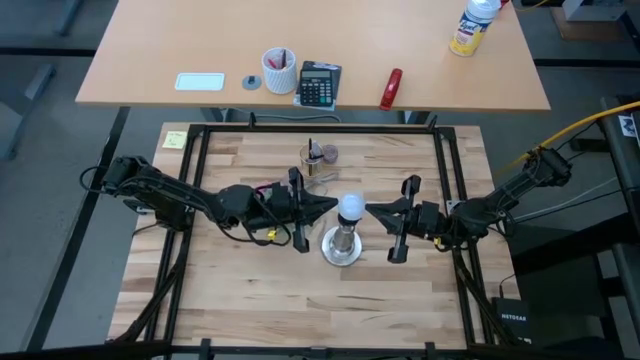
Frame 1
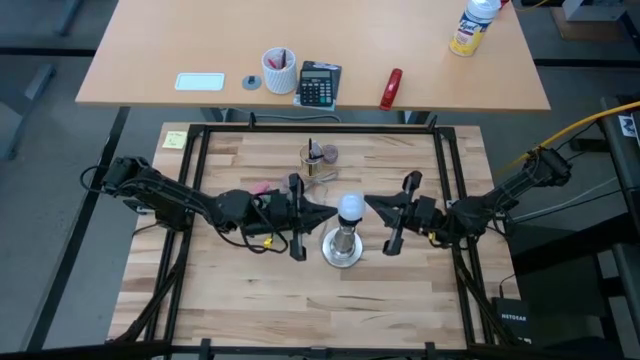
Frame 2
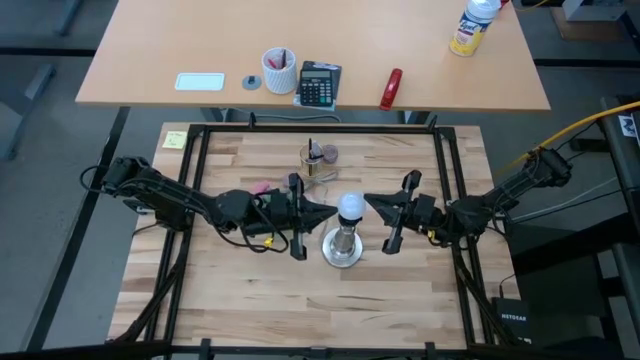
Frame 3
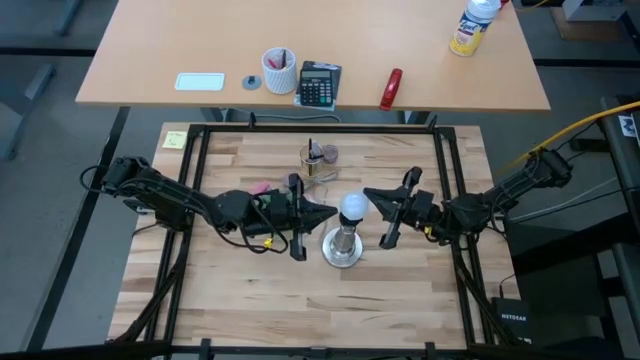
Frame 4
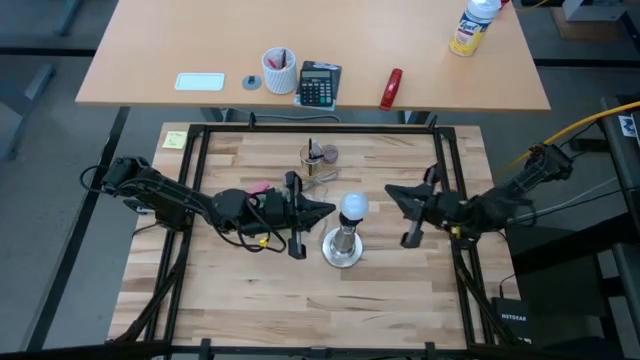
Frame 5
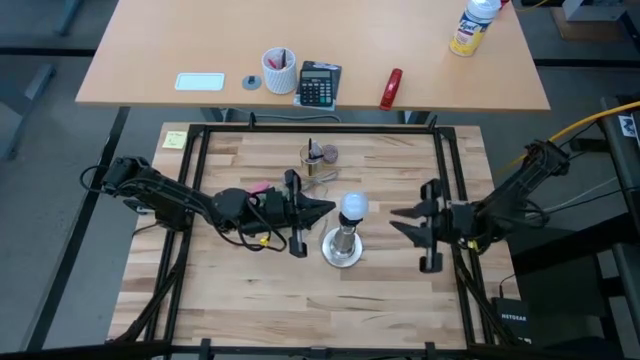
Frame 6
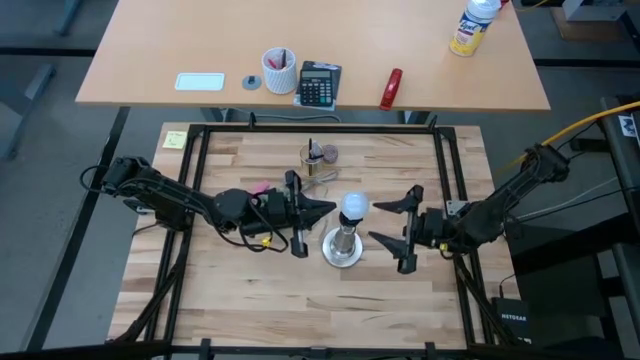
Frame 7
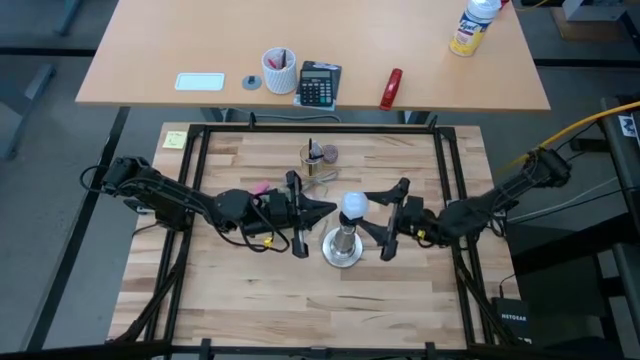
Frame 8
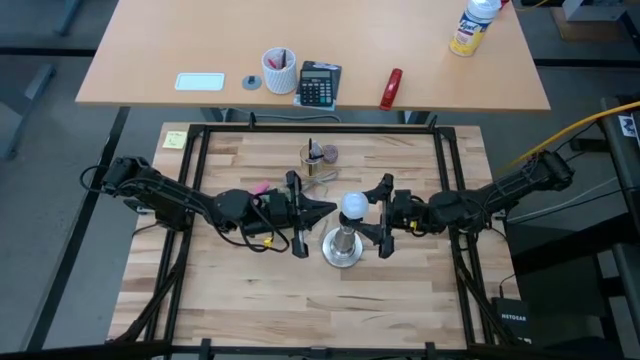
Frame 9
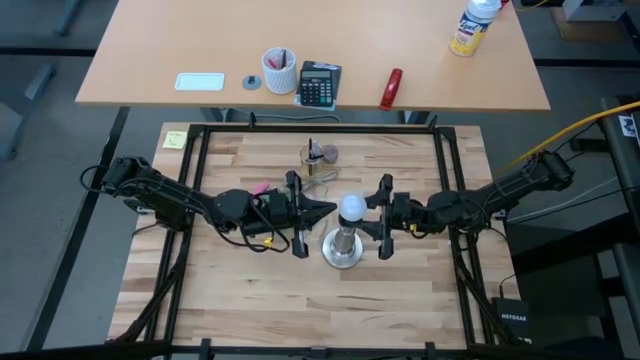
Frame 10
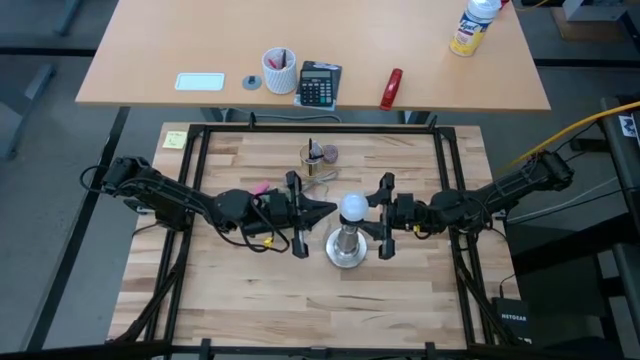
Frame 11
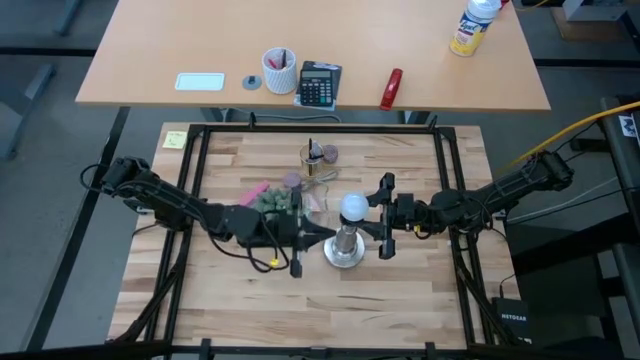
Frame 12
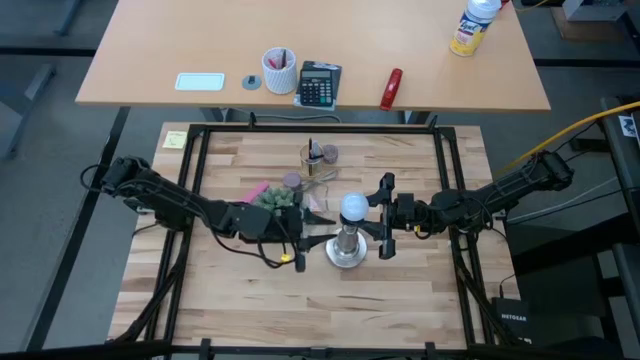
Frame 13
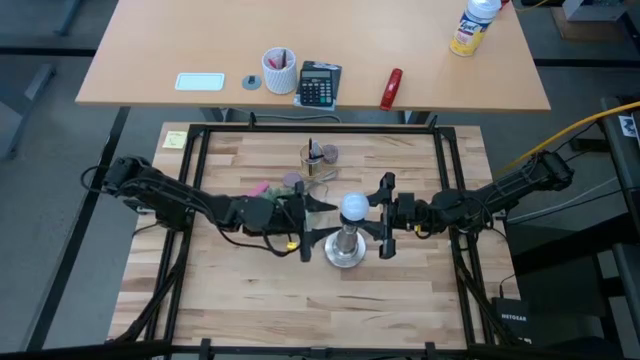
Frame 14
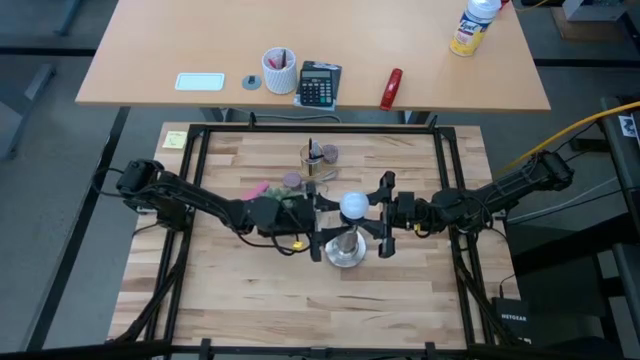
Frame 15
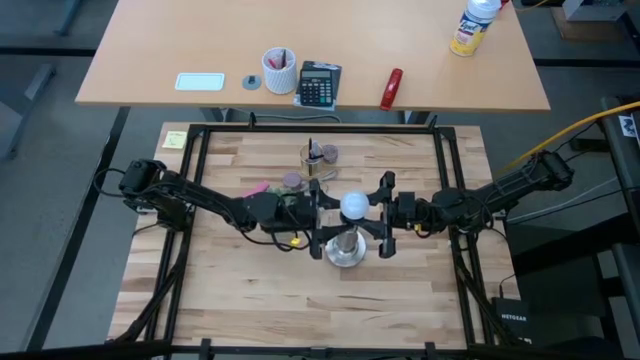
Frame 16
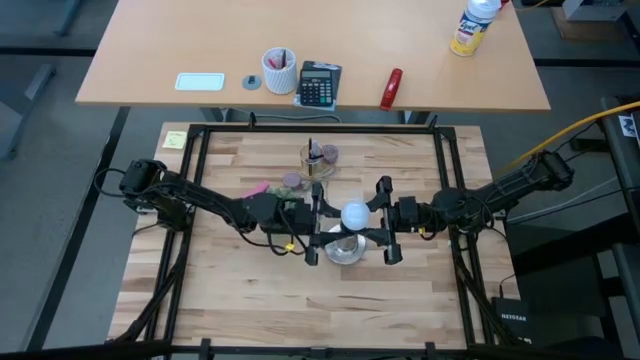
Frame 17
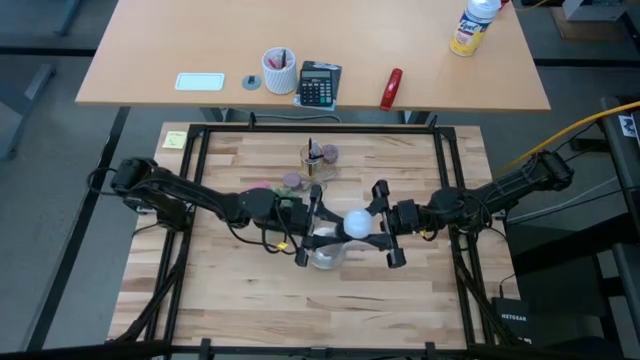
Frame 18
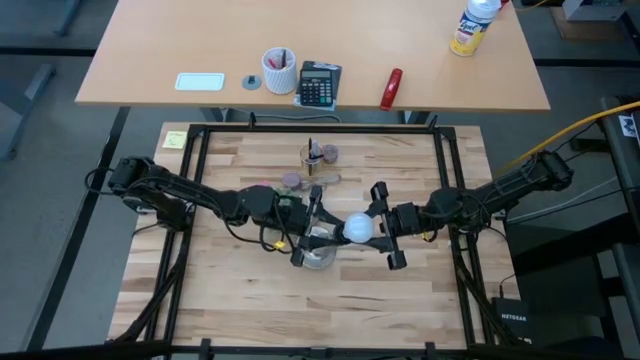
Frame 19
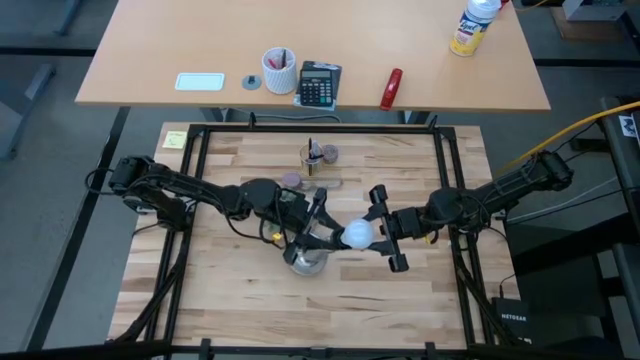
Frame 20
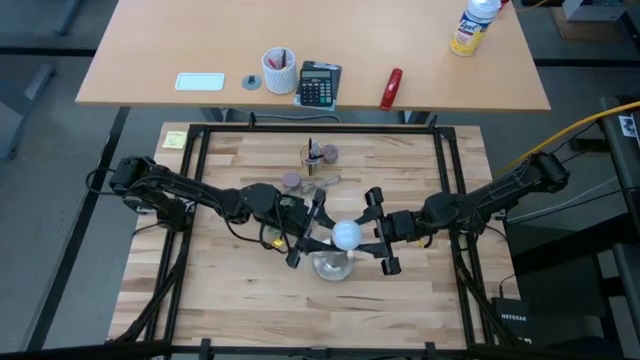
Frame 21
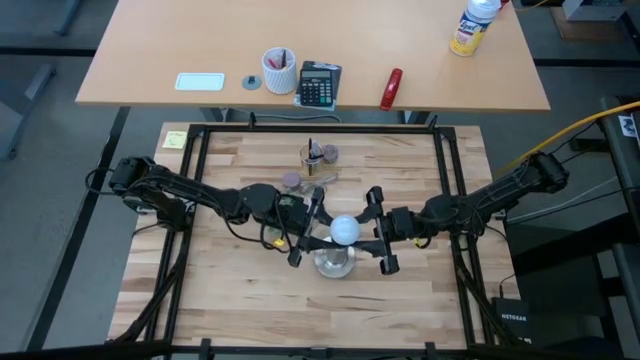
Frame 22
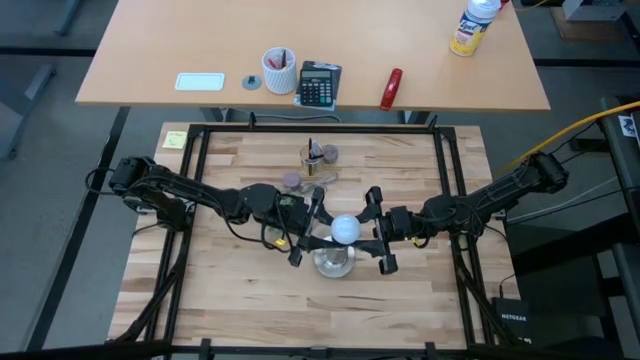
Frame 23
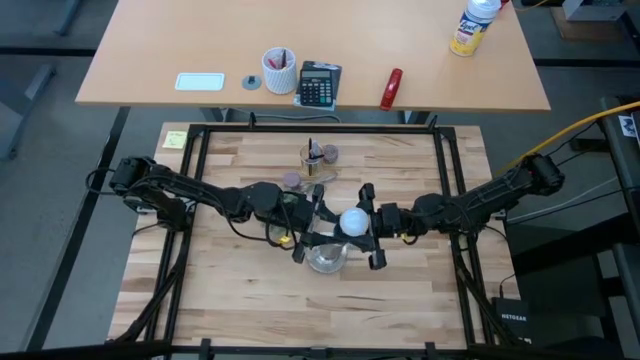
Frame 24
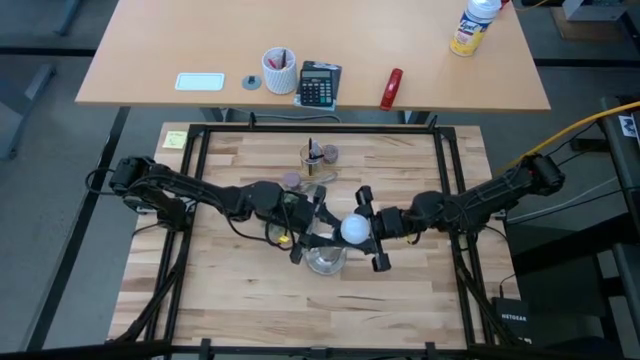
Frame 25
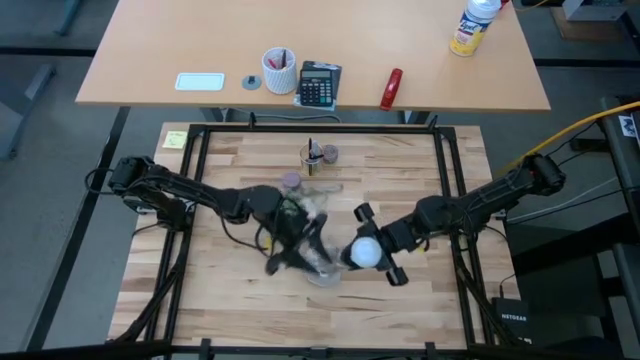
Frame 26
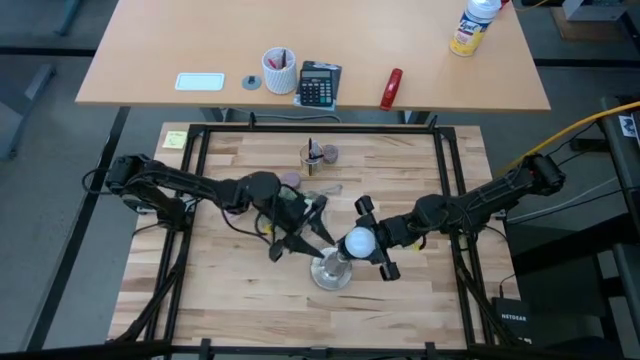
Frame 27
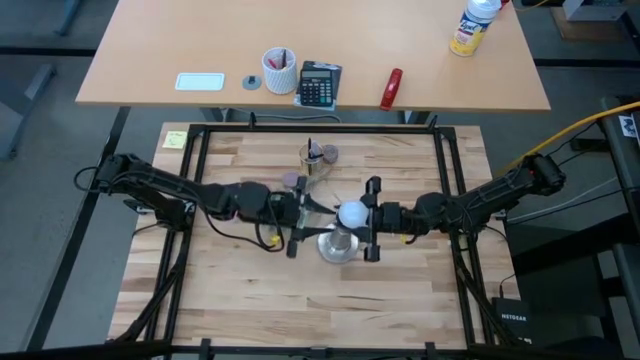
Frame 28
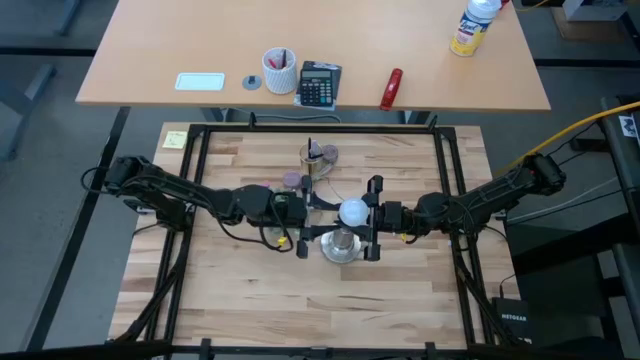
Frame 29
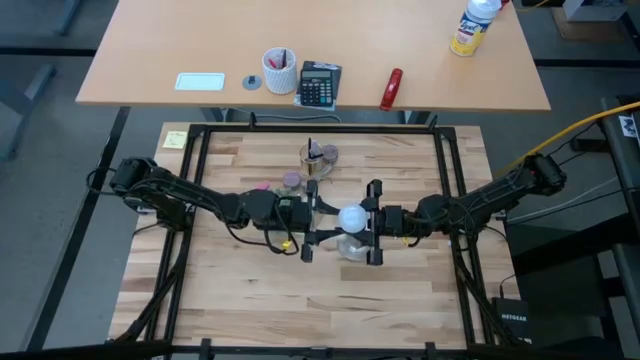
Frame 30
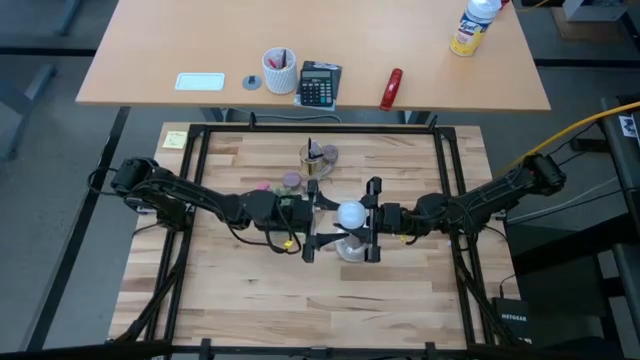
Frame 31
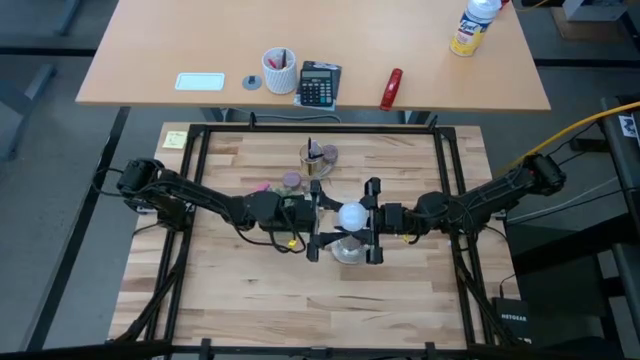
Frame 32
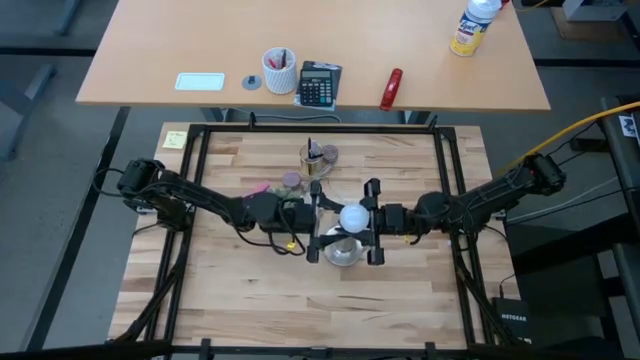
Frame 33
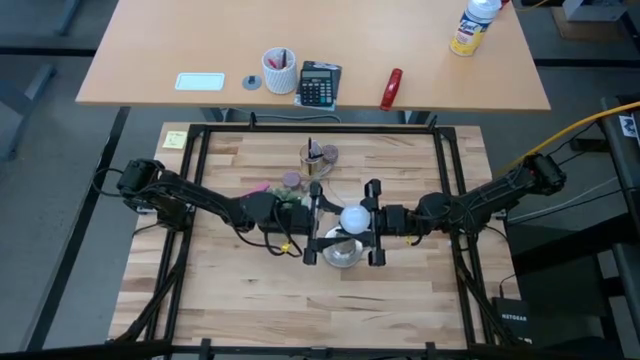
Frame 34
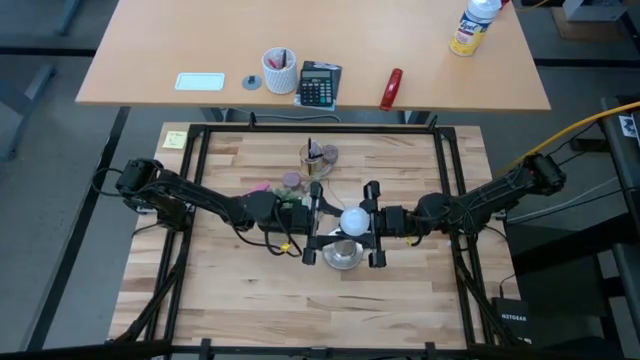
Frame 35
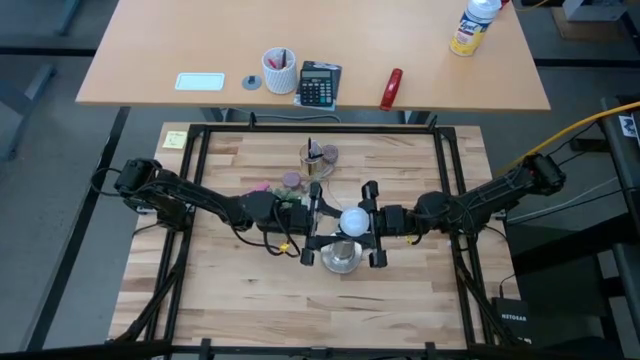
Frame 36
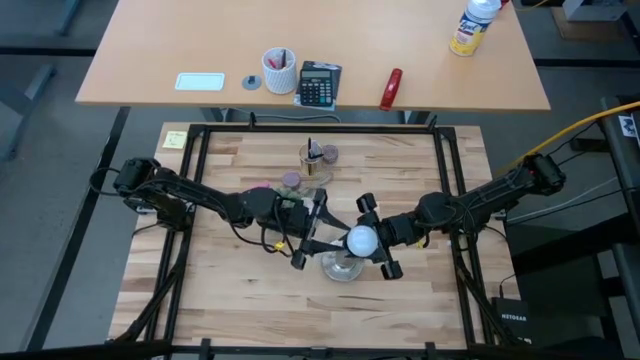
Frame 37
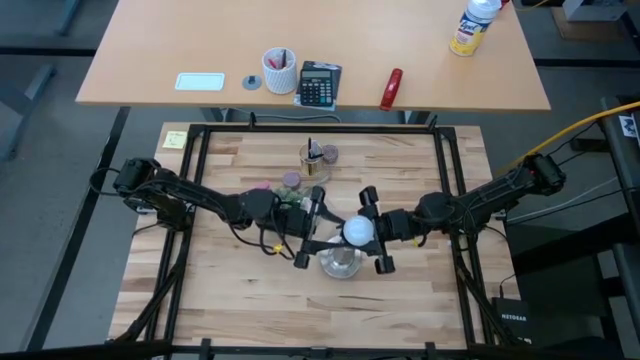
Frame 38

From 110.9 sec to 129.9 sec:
Task: Screw lightbulb
Remove the lightbulb from the lamp

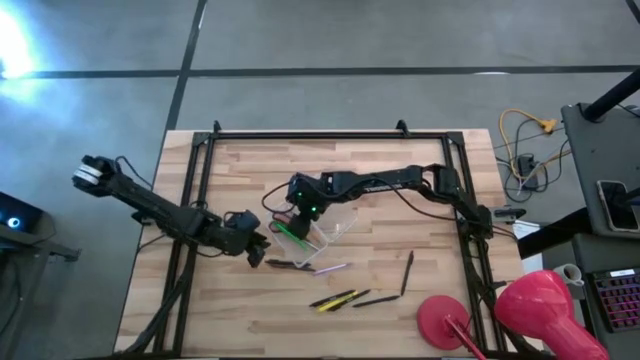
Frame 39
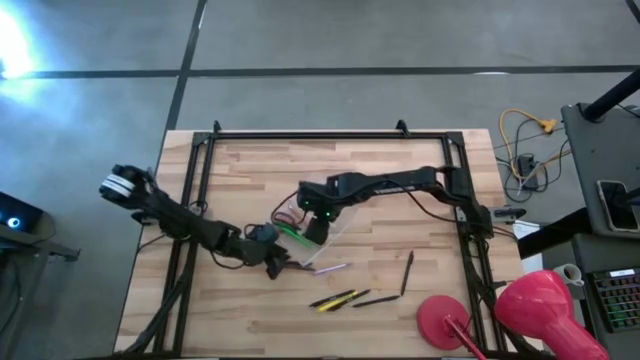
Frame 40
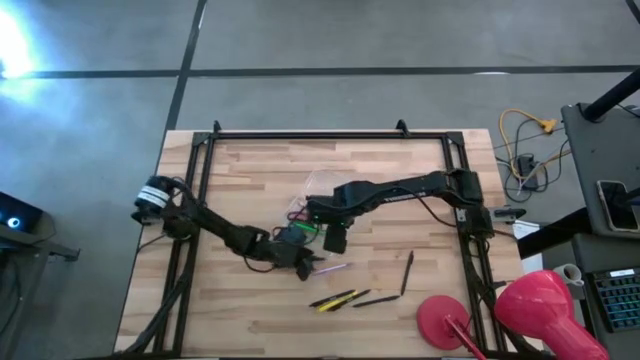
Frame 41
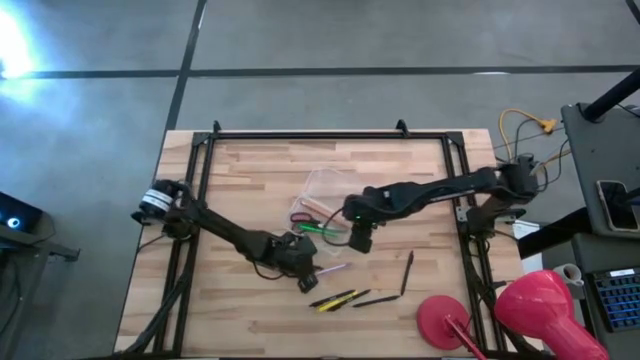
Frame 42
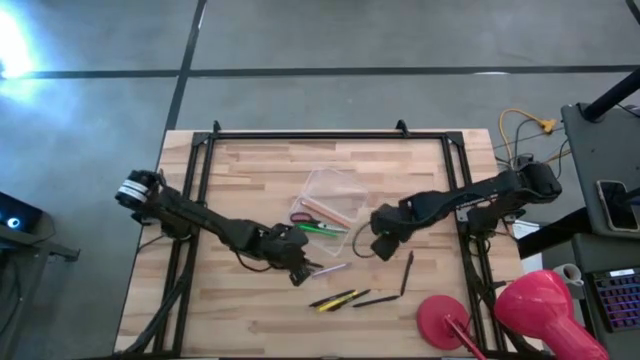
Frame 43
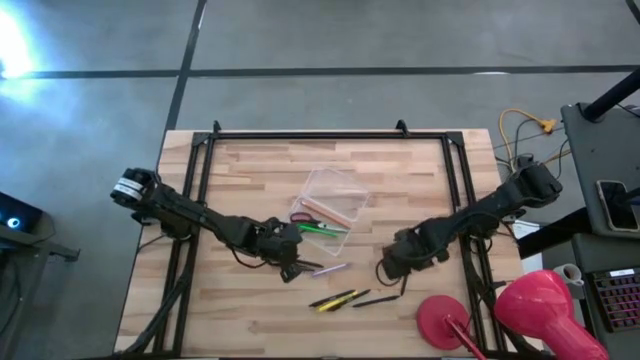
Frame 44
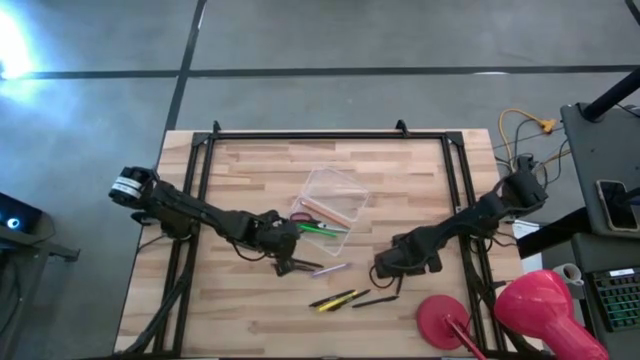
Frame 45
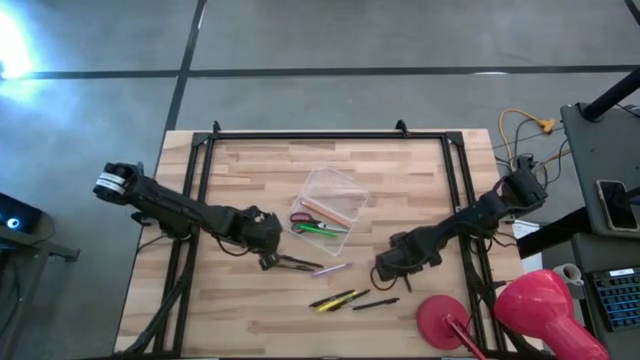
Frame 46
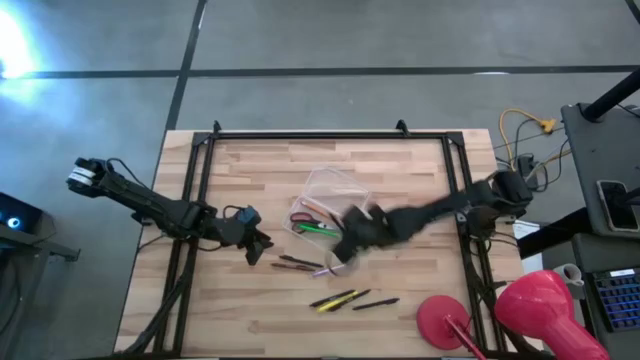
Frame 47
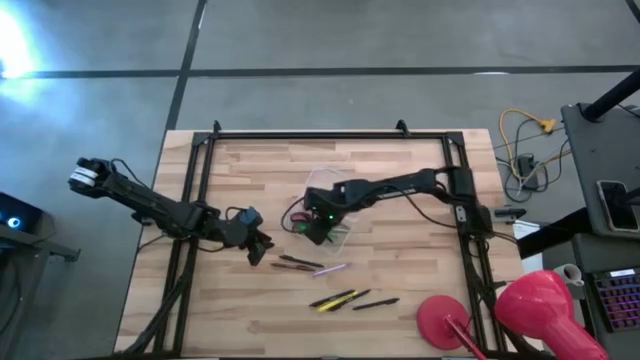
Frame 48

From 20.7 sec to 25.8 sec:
Task: Pick & place school supplies into a supply box
Put the black pen into the transparent case
